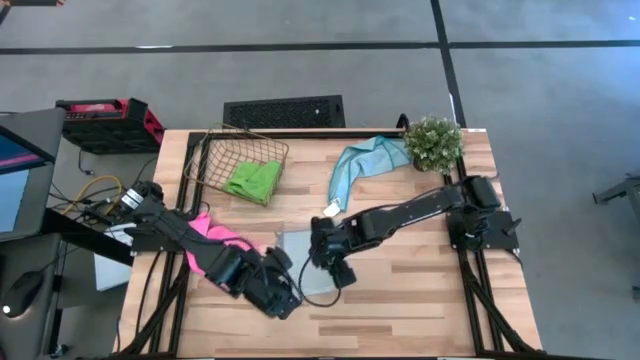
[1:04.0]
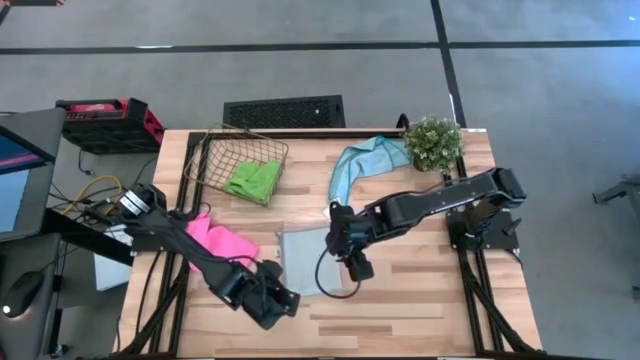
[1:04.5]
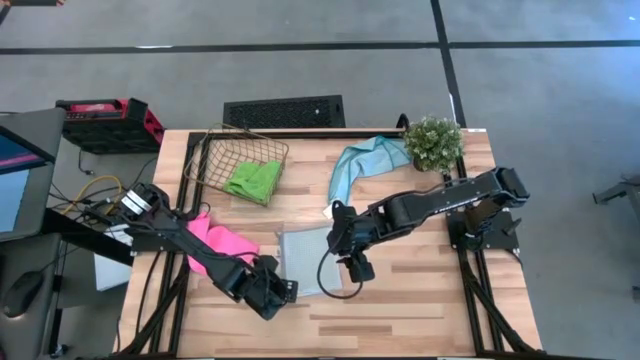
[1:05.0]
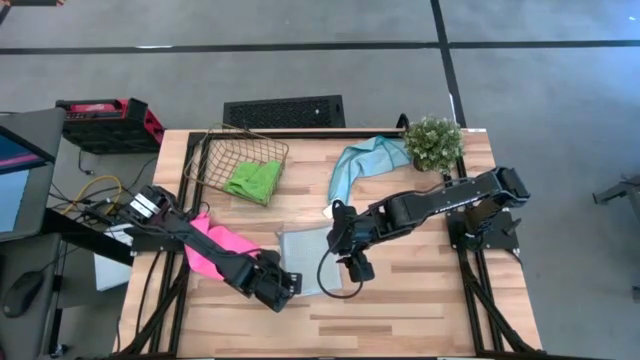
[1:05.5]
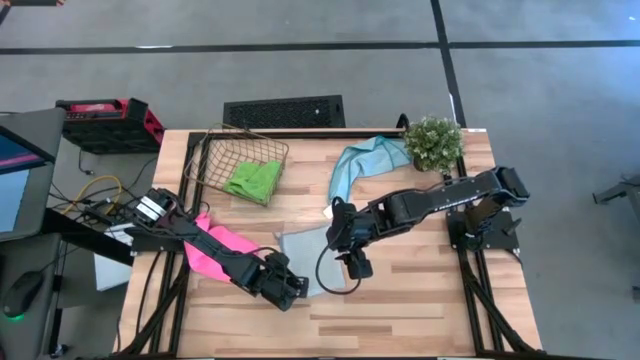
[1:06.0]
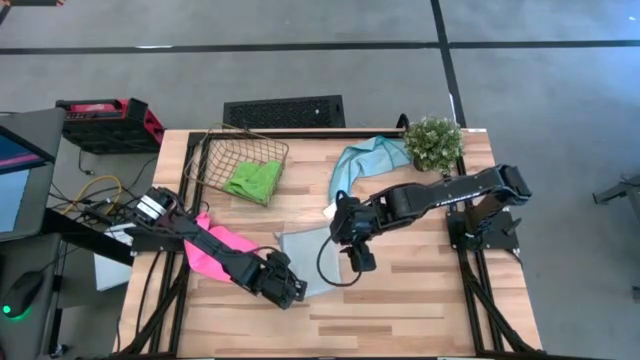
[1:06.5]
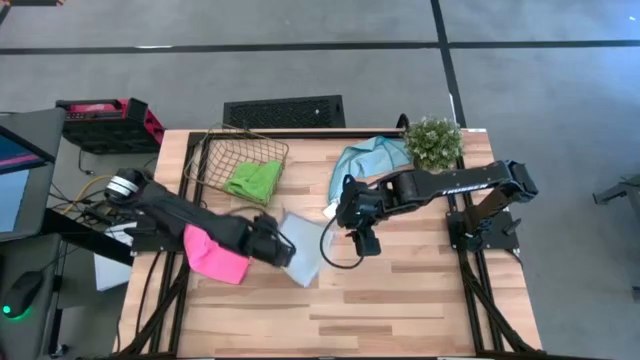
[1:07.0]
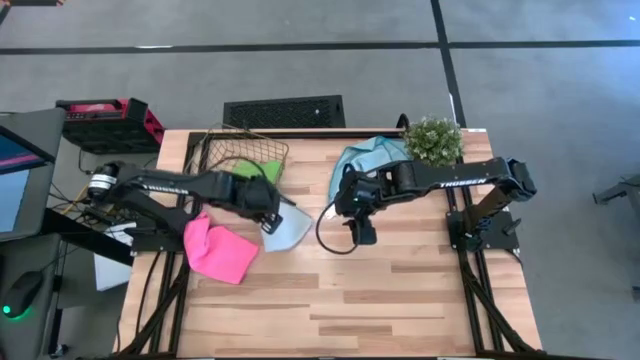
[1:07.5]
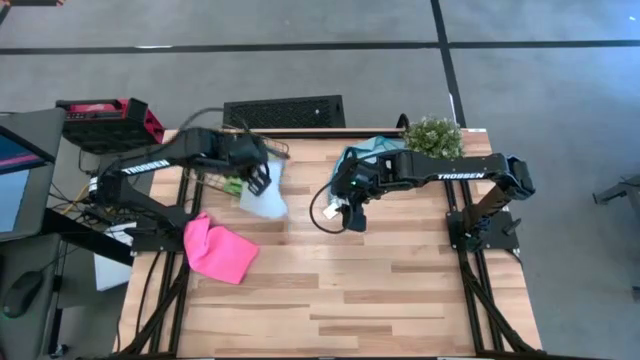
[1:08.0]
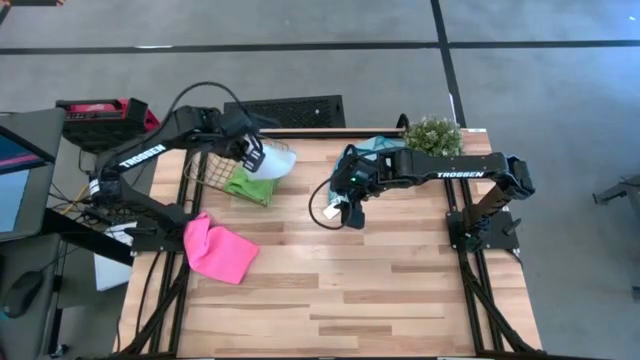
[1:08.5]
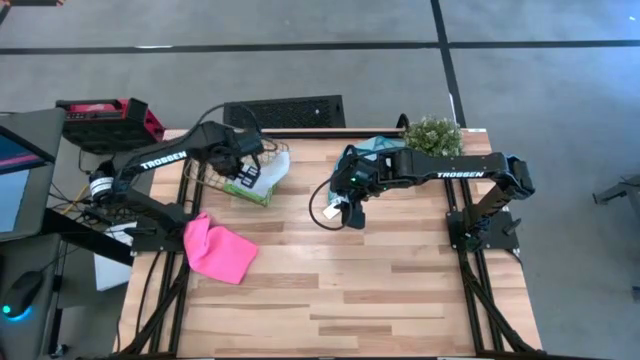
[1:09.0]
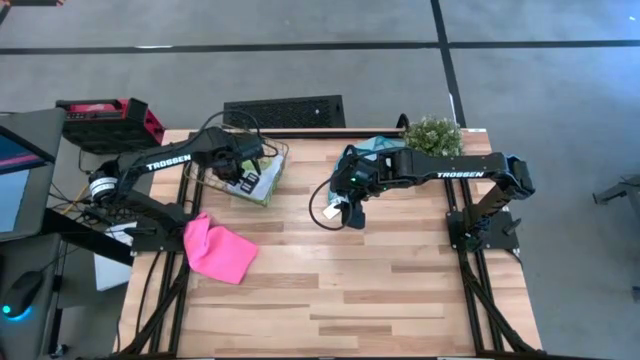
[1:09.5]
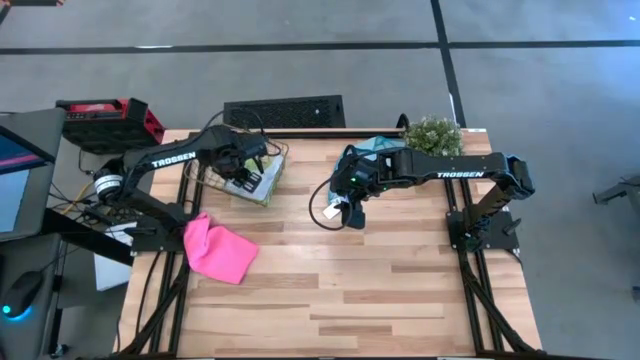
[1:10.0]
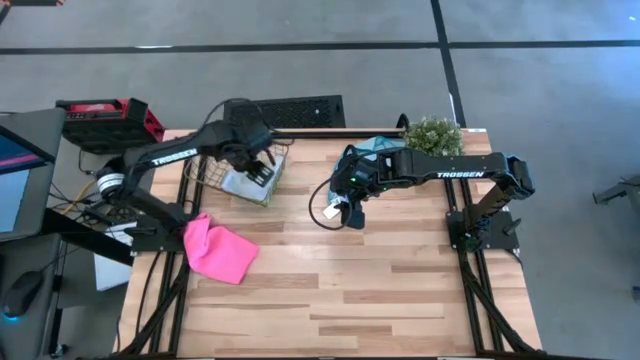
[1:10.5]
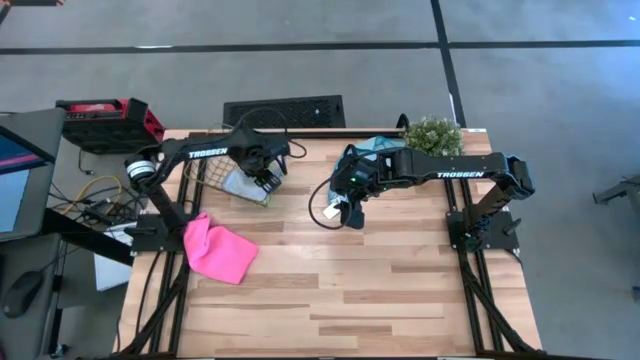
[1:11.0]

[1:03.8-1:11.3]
Task: Fold microfiber towels
Put the gray microfiber cloth into the gold wire basket

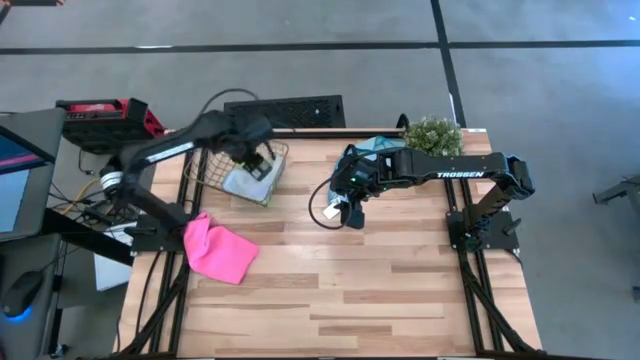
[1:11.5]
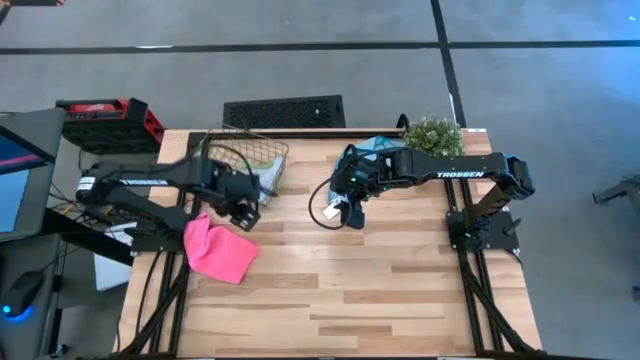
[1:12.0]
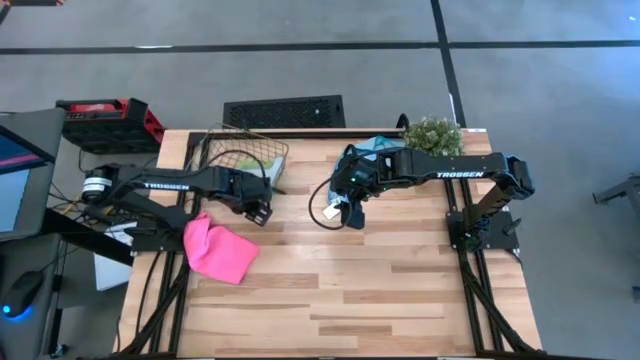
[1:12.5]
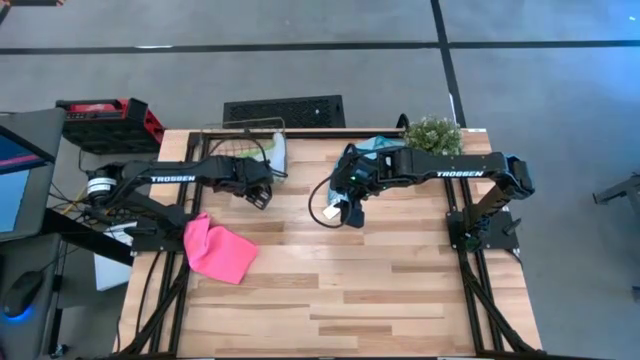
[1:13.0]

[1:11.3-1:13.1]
Adjust the gold wire basket

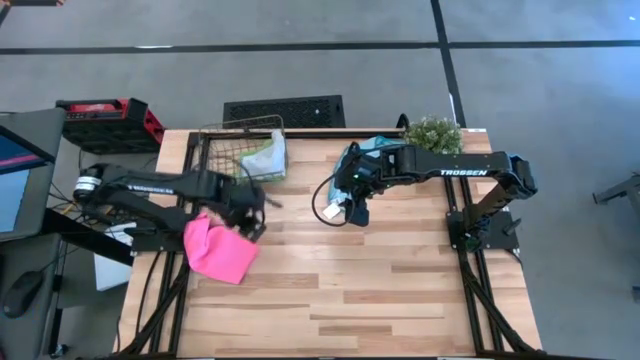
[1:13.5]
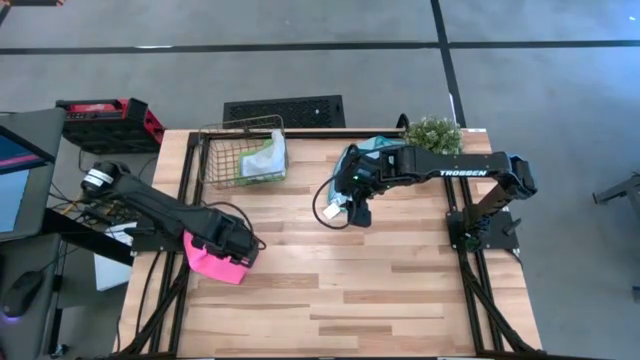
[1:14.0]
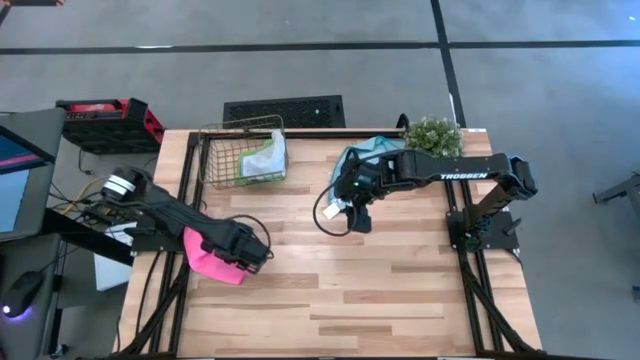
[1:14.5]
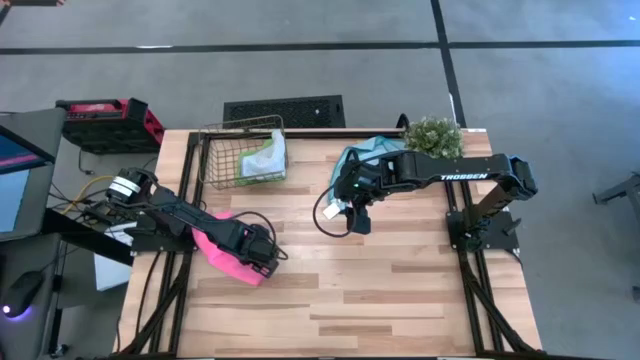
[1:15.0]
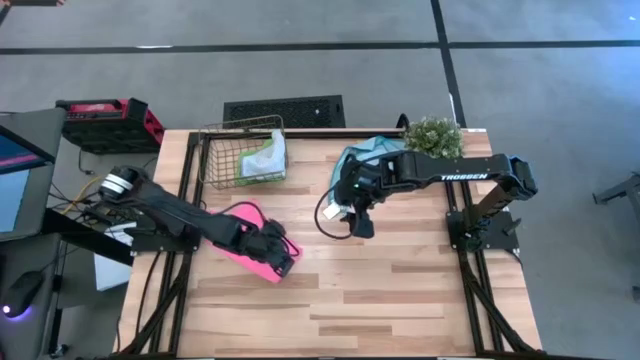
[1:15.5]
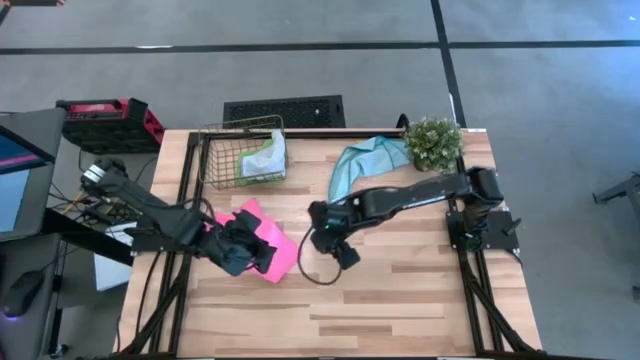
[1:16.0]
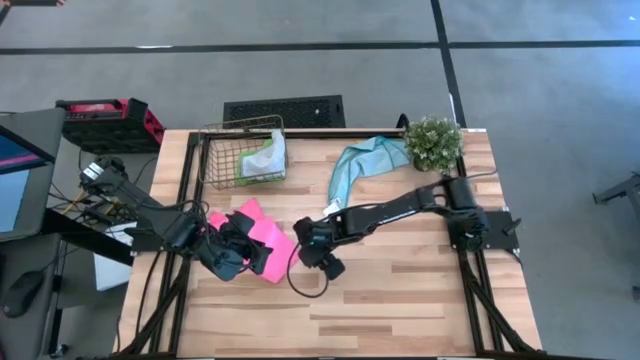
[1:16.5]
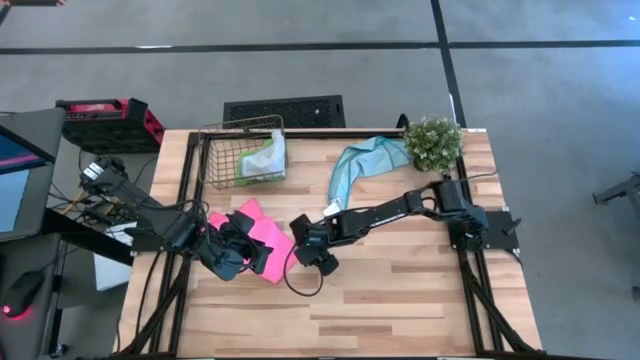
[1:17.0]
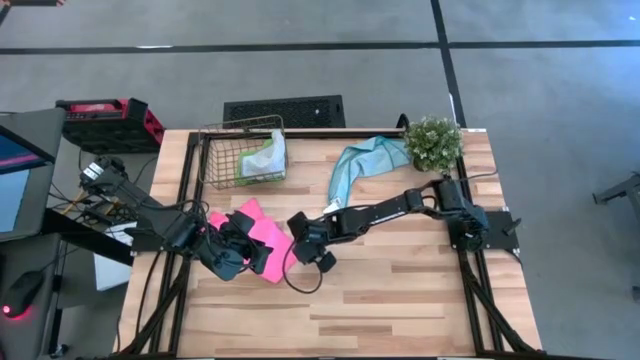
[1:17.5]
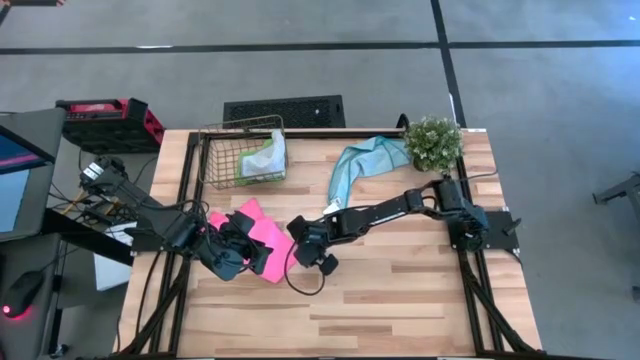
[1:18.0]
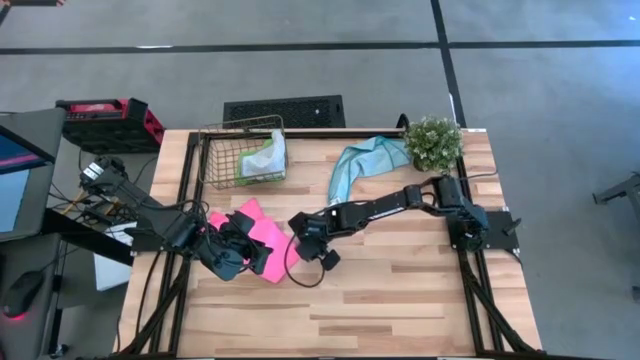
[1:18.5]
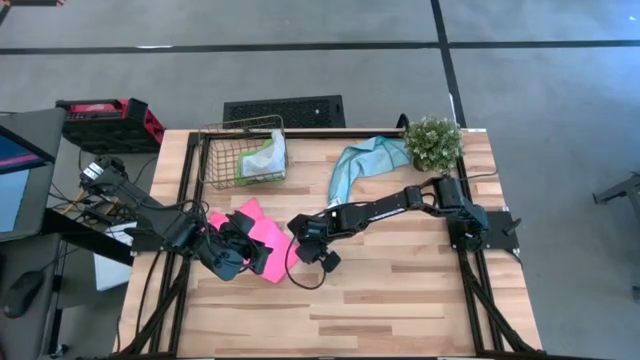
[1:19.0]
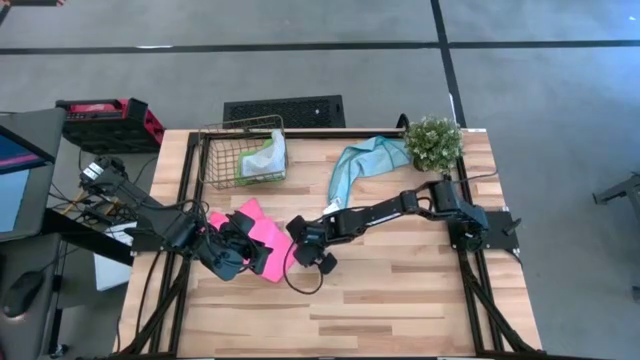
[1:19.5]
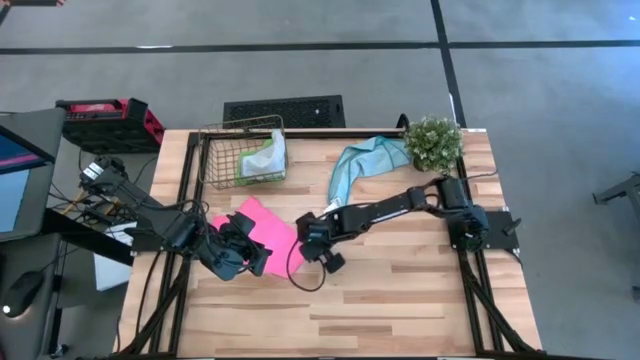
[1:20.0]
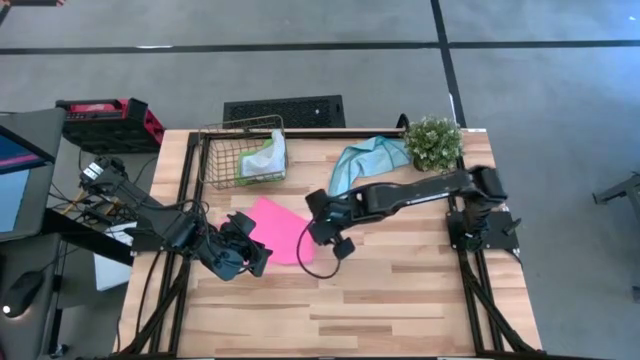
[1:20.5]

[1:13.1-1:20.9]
Fold the pink microfiber cloth

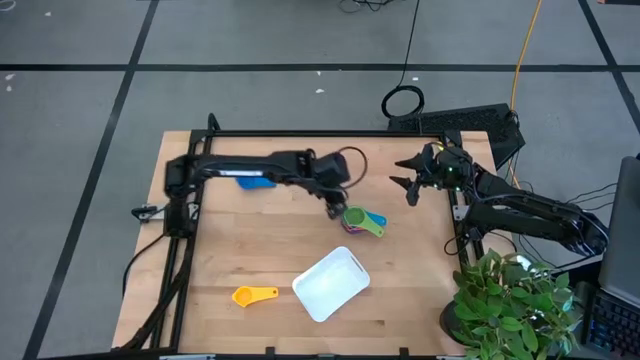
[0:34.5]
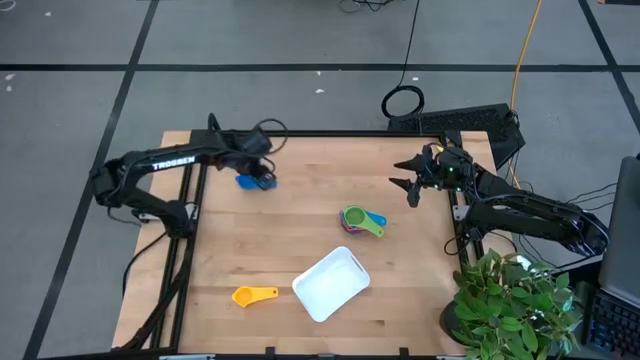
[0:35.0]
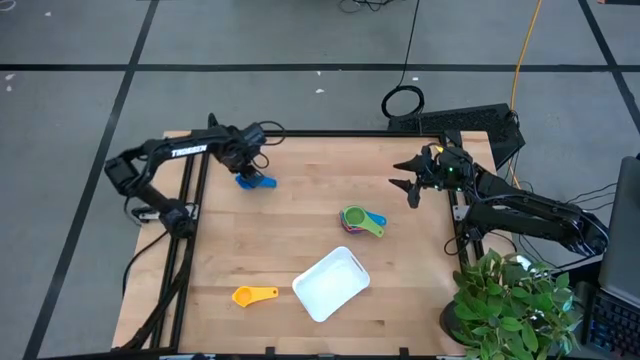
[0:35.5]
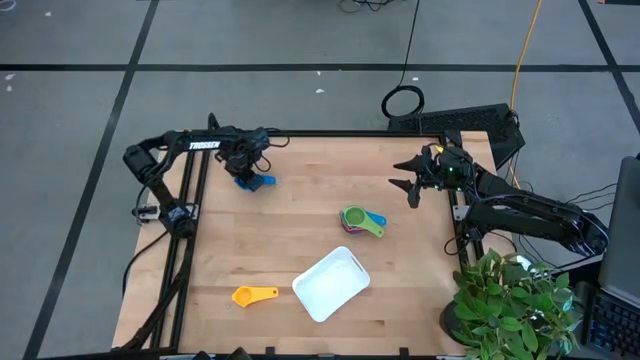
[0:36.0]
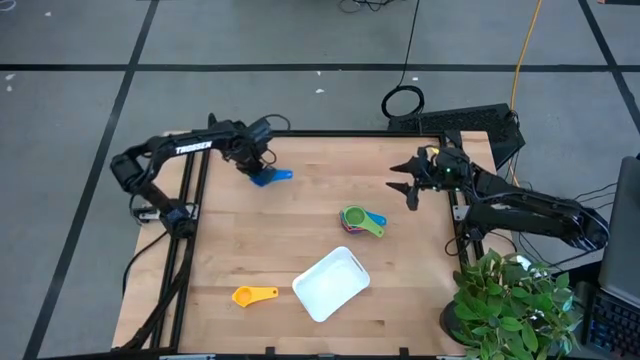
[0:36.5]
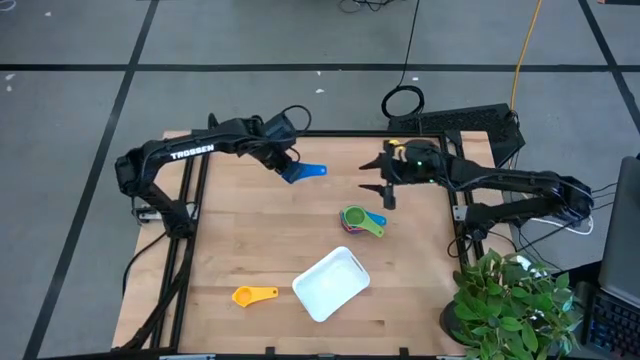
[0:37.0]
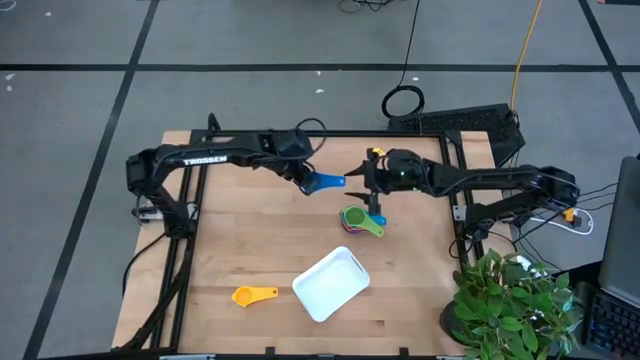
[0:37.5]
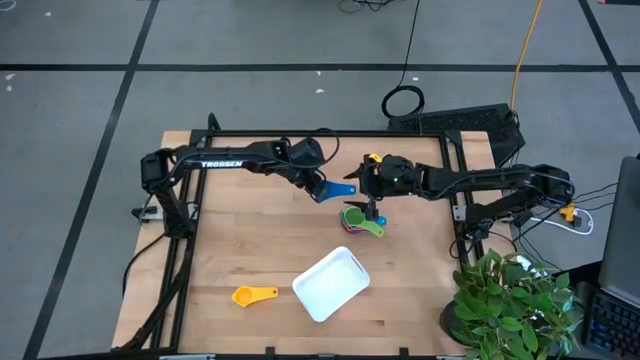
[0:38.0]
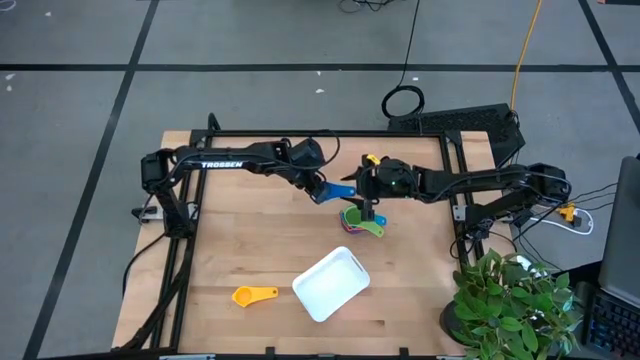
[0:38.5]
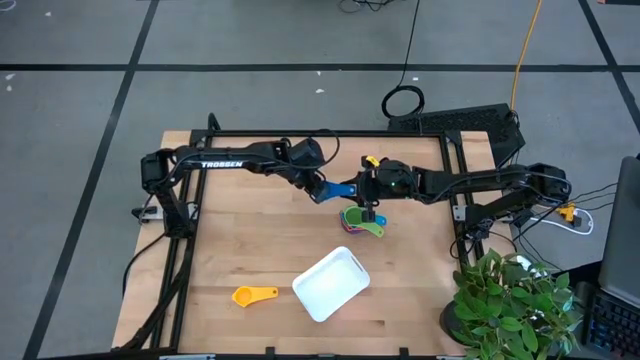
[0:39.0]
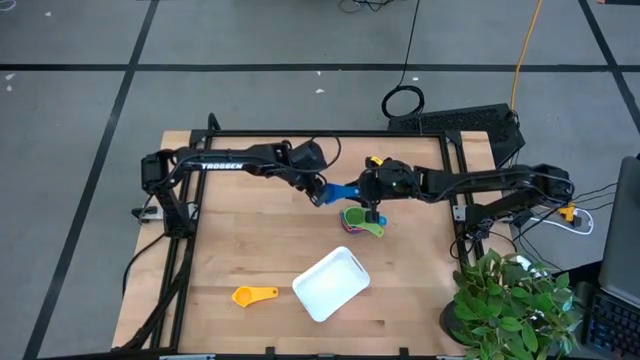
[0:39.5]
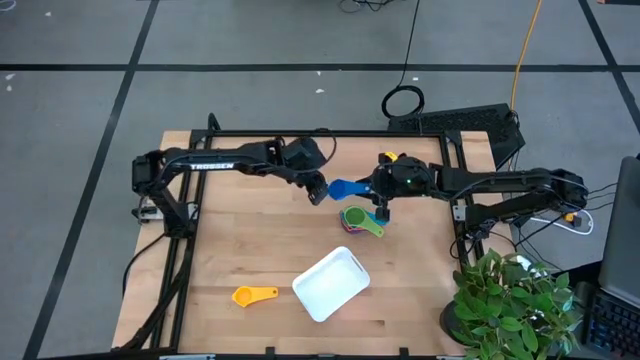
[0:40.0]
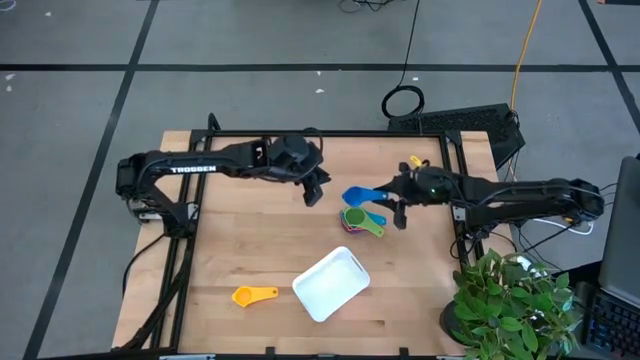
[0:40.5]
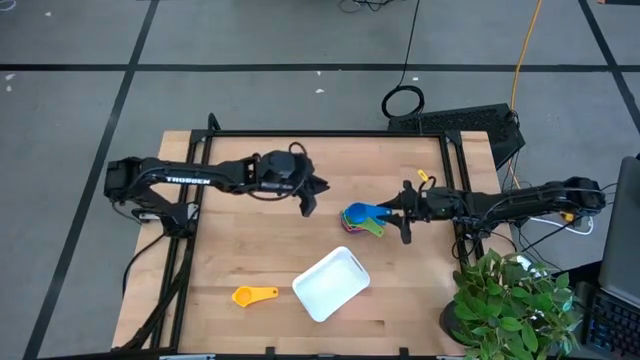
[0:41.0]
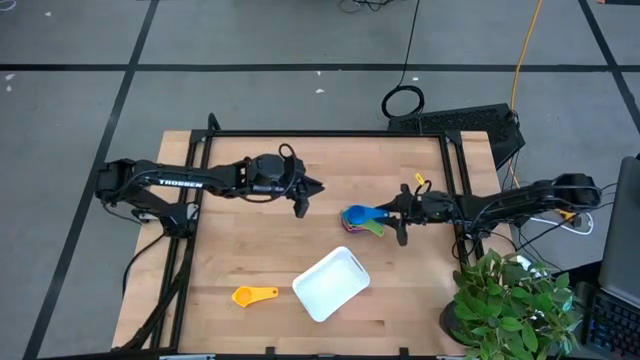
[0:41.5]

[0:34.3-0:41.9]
Task: Nest measuring cups in basket
Stack the blue measuring cup on top of the green measuring cup
